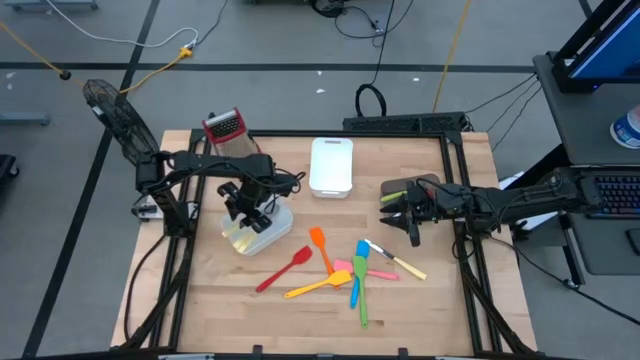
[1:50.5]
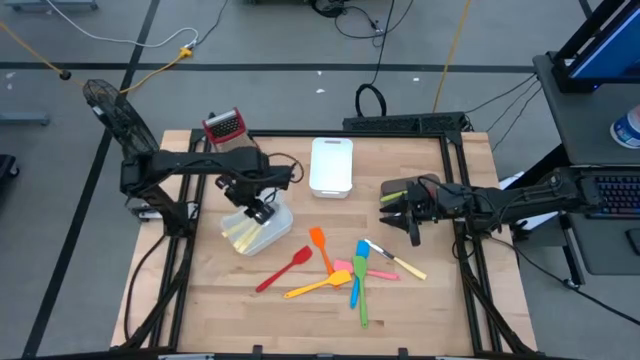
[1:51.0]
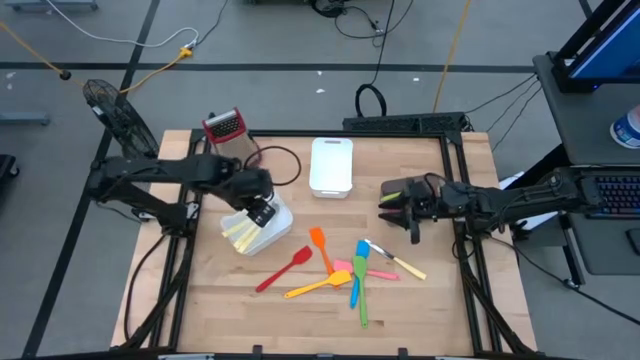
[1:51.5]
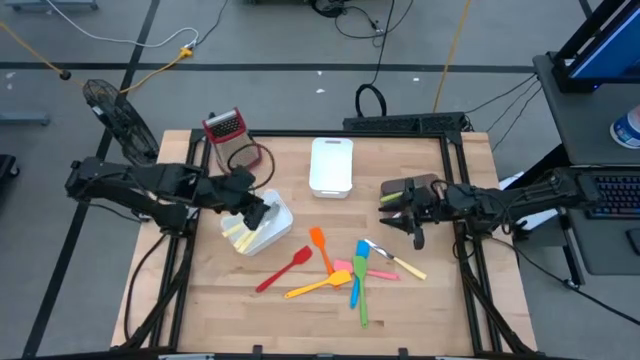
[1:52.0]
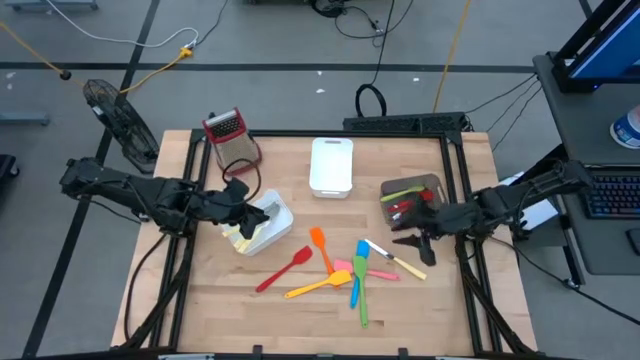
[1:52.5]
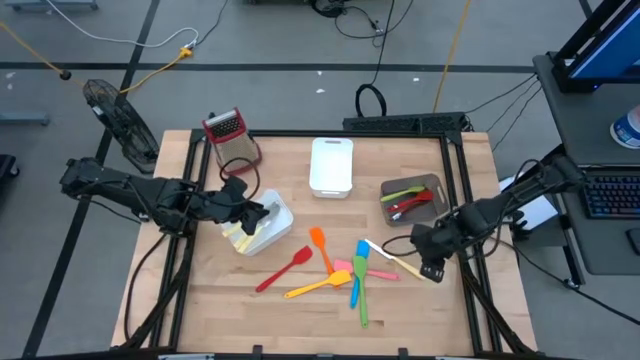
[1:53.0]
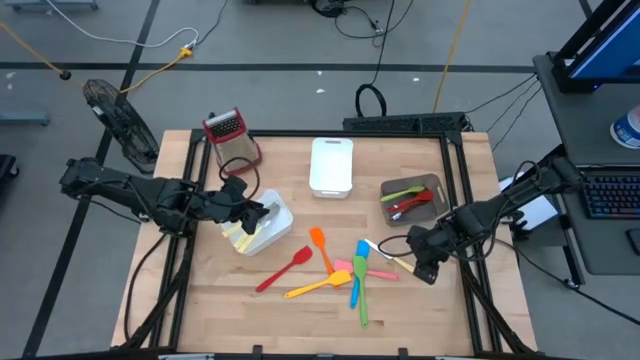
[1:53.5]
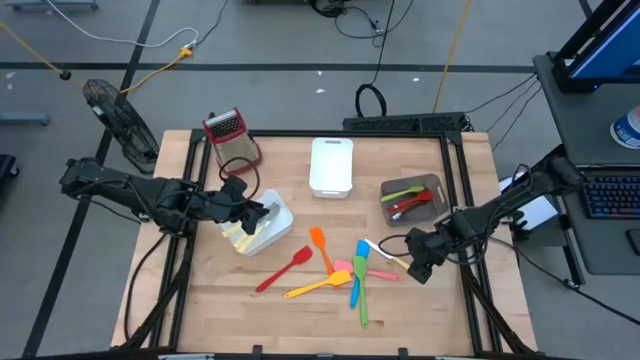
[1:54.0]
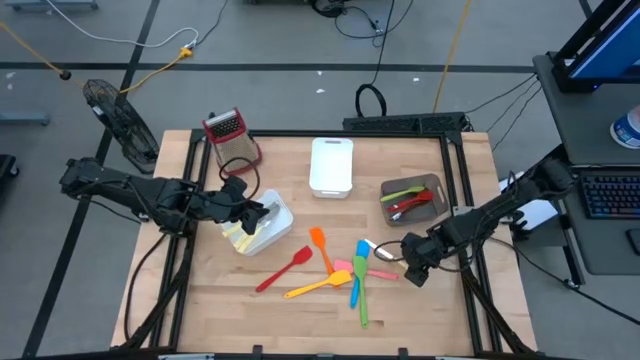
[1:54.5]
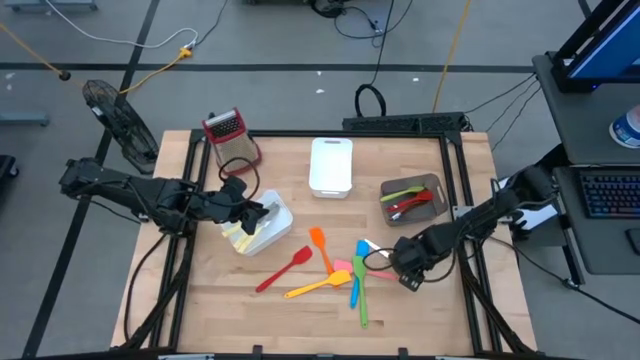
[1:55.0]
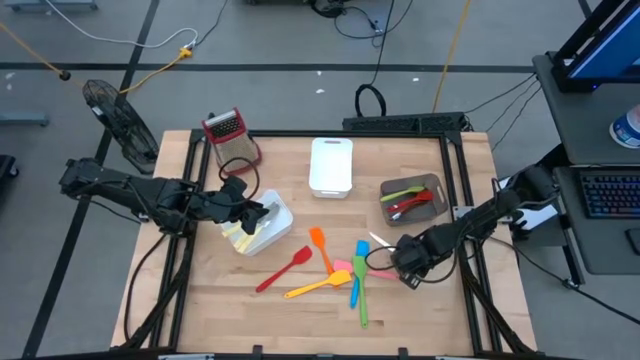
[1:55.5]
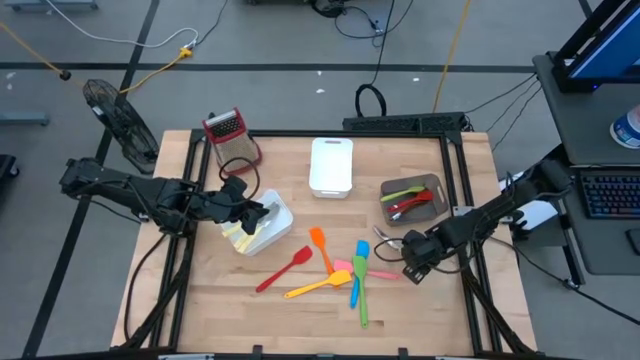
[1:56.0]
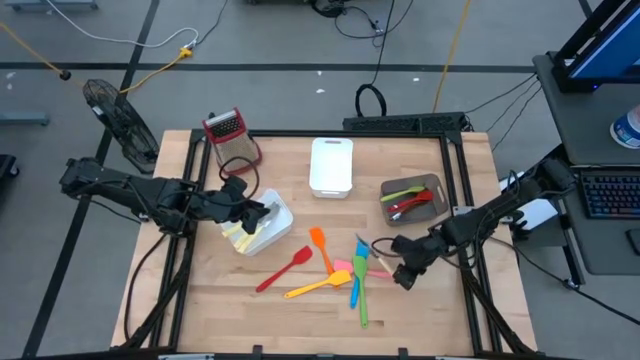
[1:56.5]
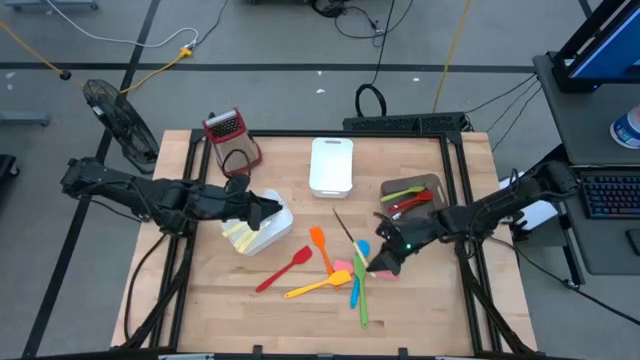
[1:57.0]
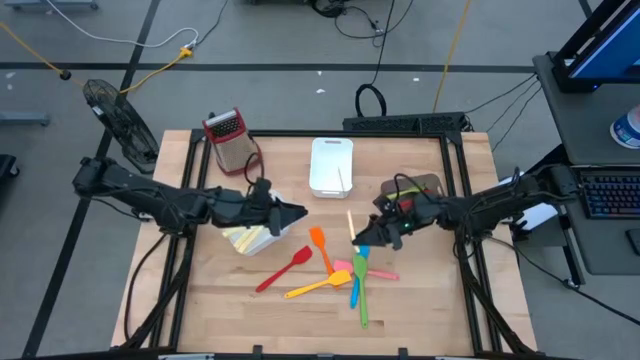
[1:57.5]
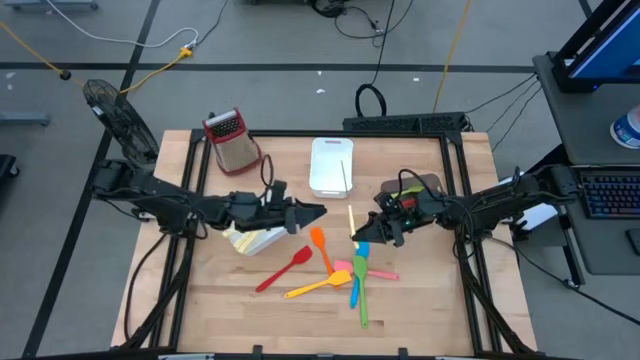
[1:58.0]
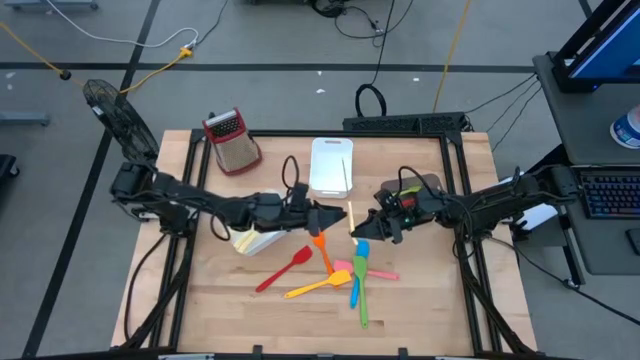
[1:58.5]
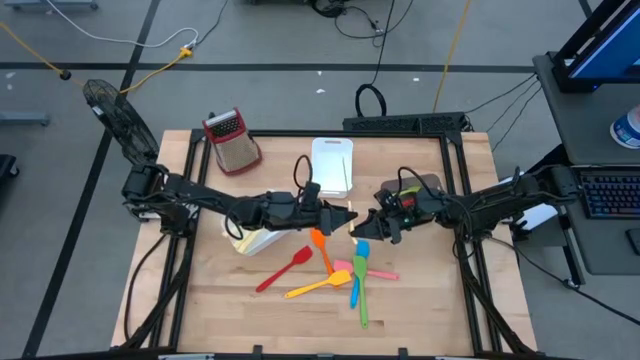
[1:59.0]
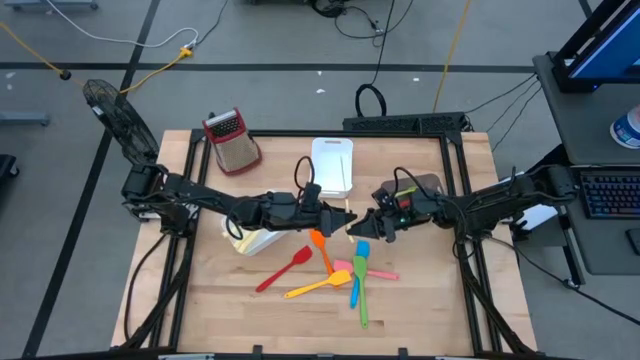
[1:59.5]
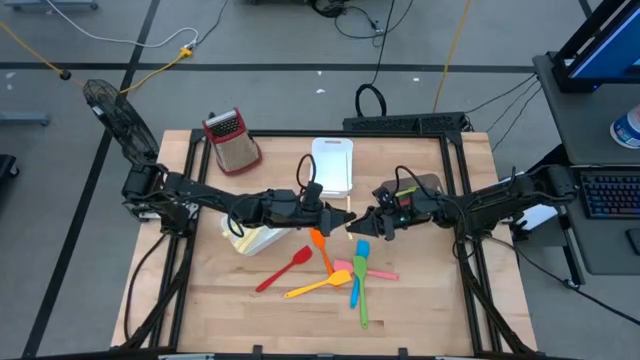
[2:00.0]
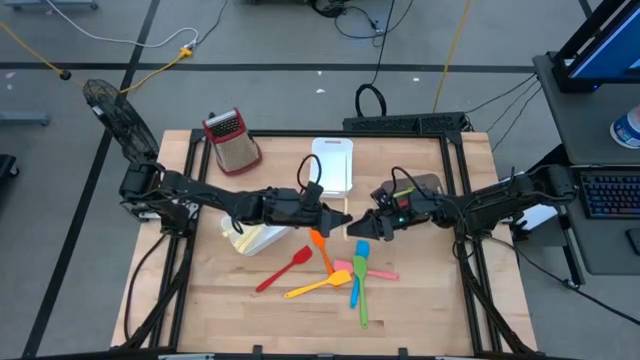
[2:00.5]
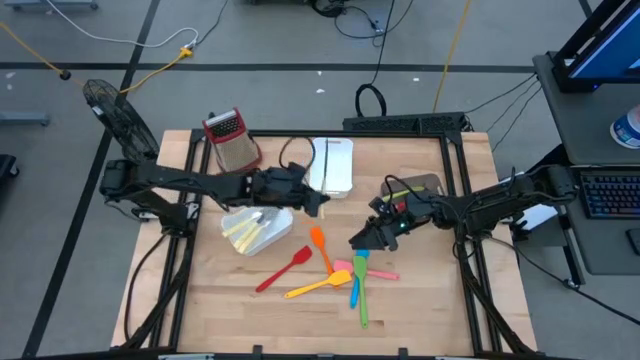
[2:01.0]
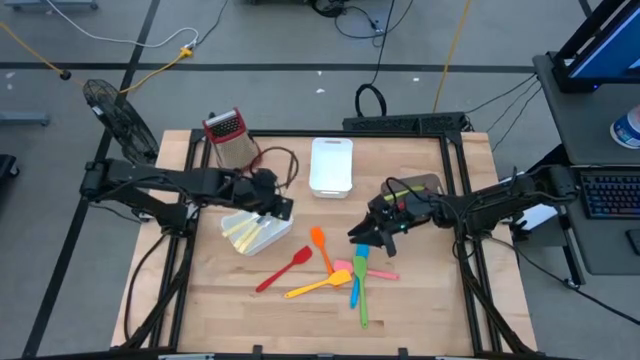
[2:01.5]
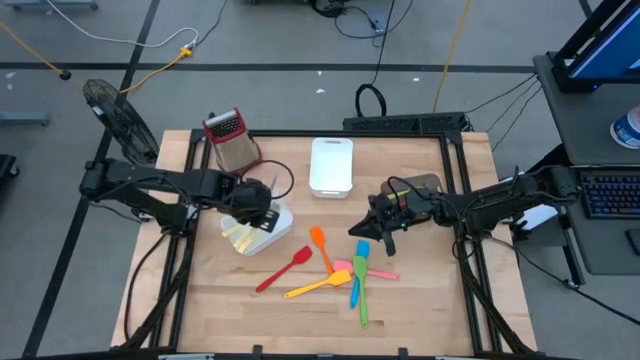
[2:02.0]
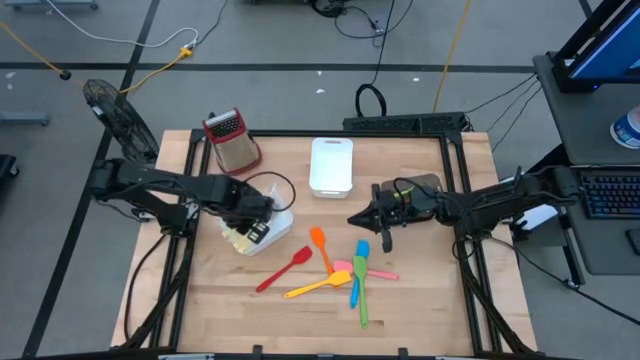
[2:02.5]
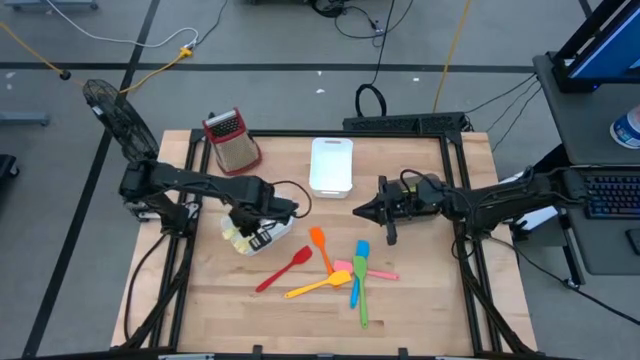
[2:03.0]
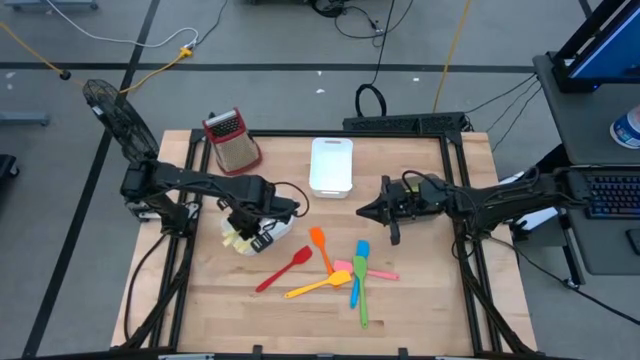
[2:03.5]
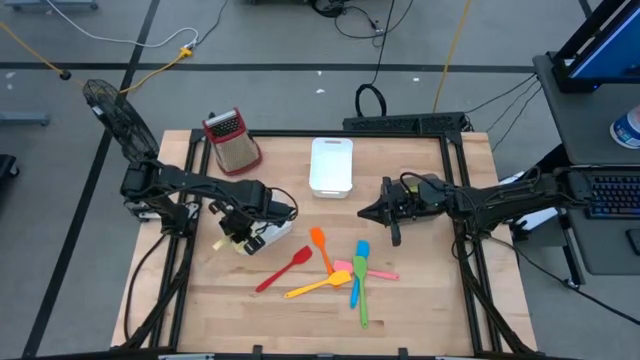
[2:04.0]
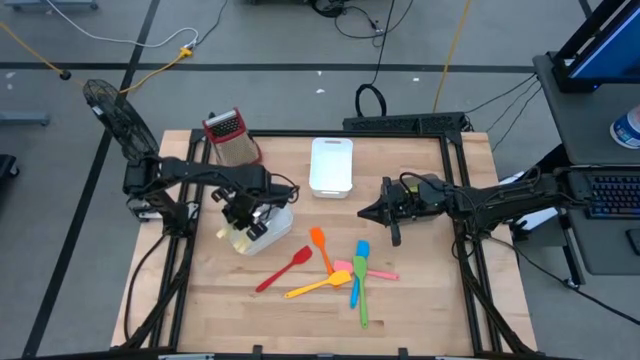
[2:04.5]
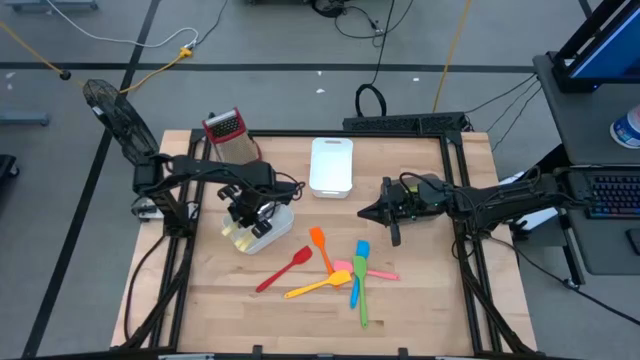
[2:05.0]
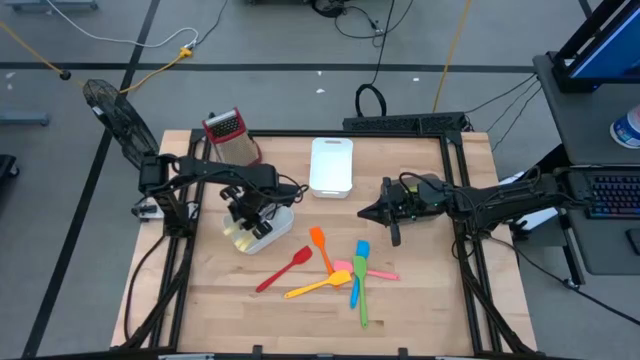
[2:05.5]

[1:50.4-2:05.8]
Task: Pick & Place Kitchen Items
Put the white table knife into the bottom white bin

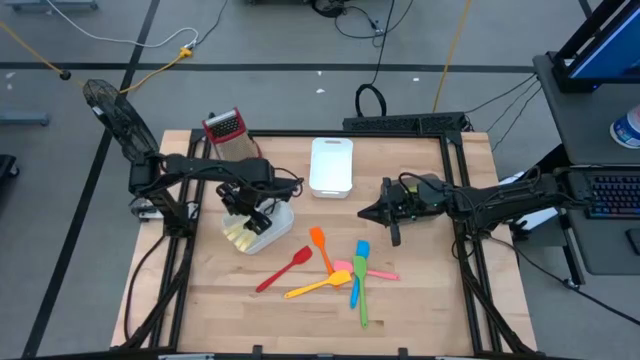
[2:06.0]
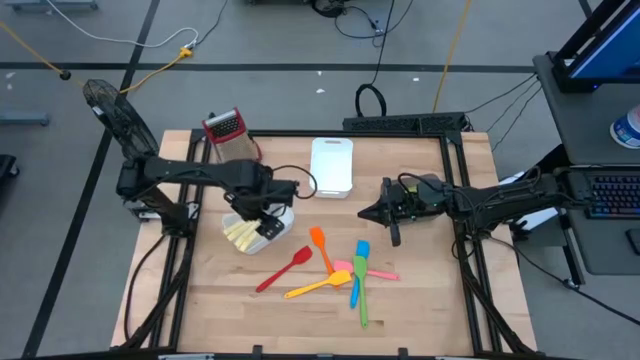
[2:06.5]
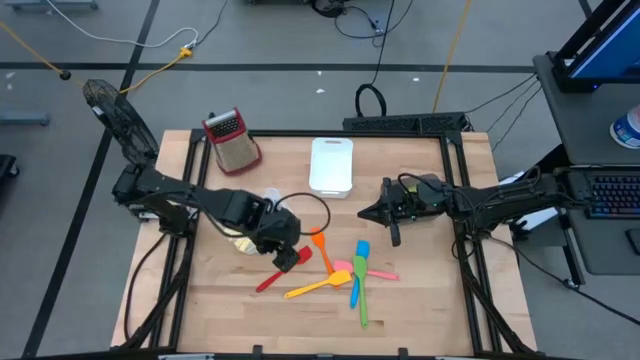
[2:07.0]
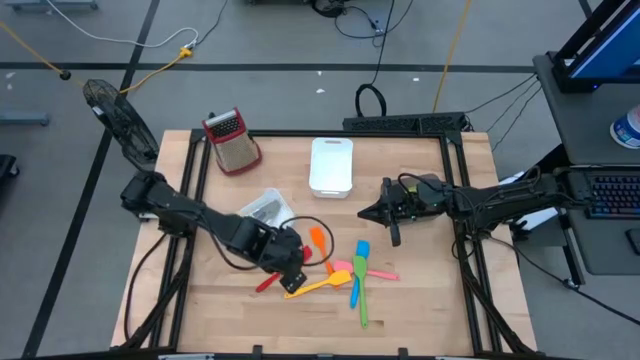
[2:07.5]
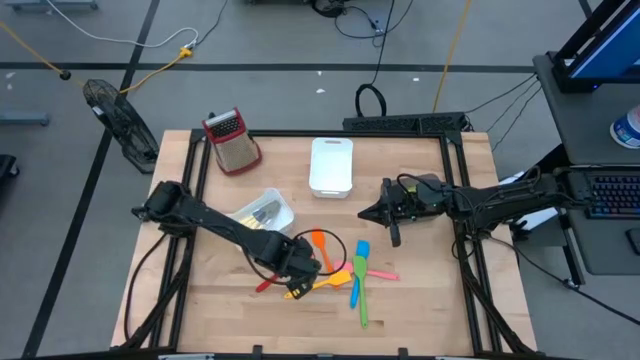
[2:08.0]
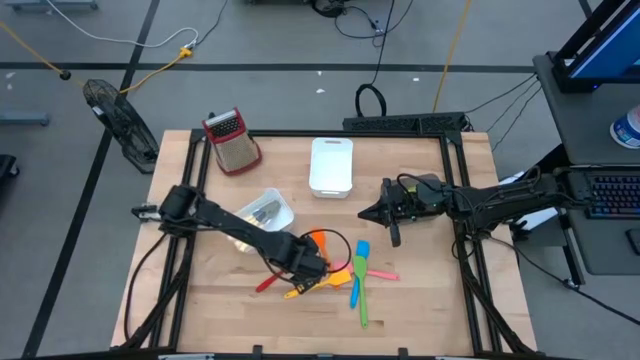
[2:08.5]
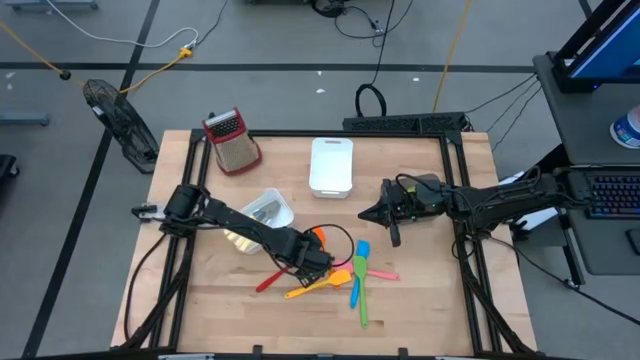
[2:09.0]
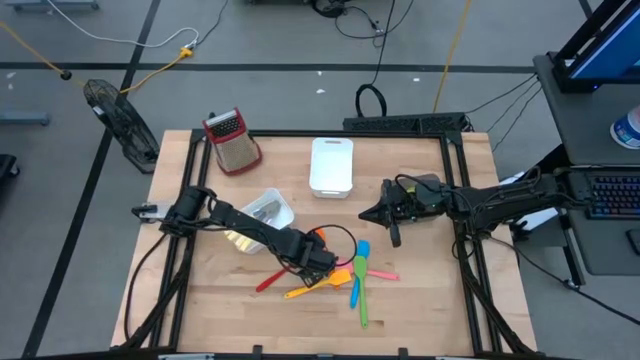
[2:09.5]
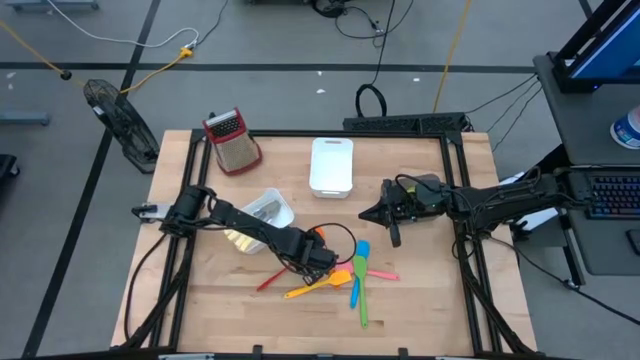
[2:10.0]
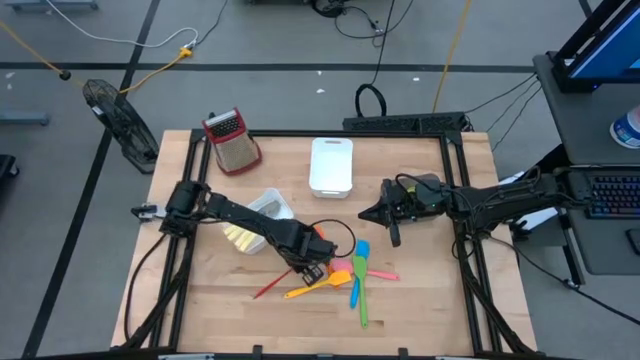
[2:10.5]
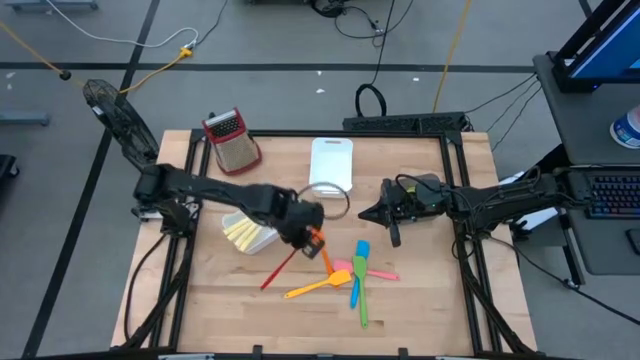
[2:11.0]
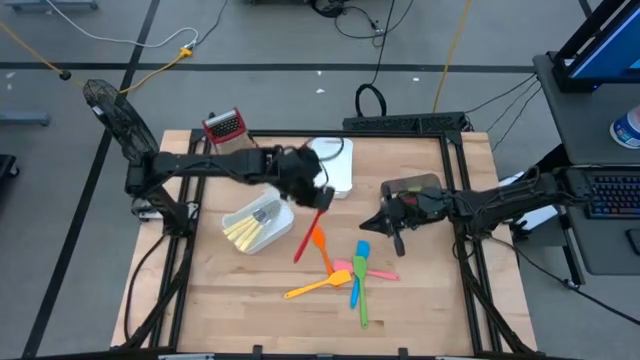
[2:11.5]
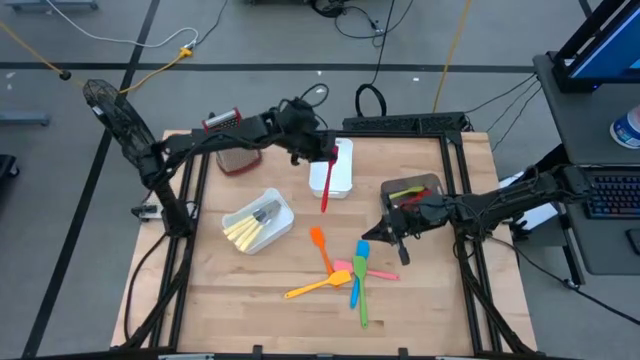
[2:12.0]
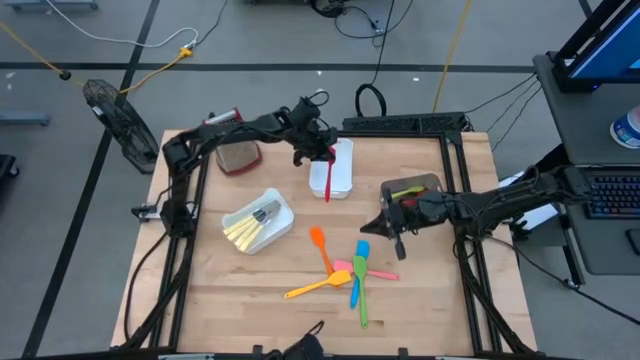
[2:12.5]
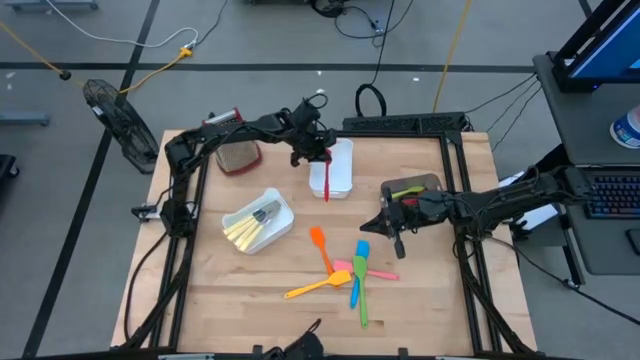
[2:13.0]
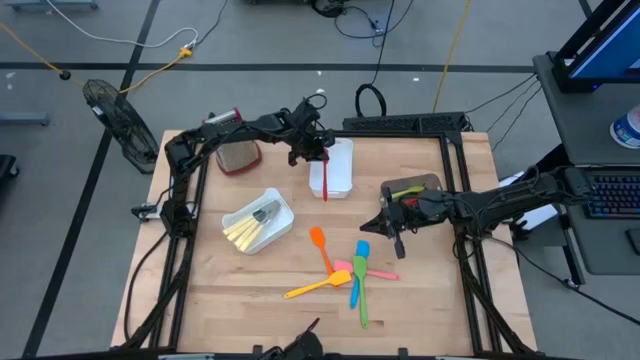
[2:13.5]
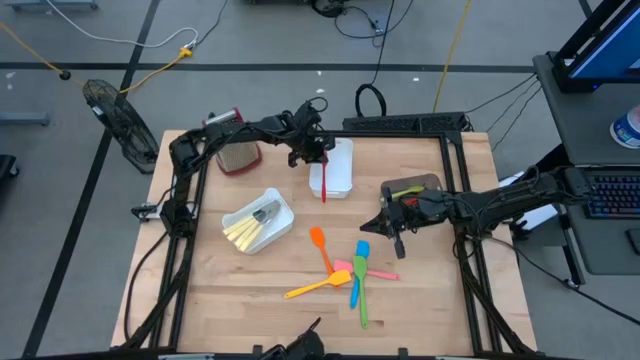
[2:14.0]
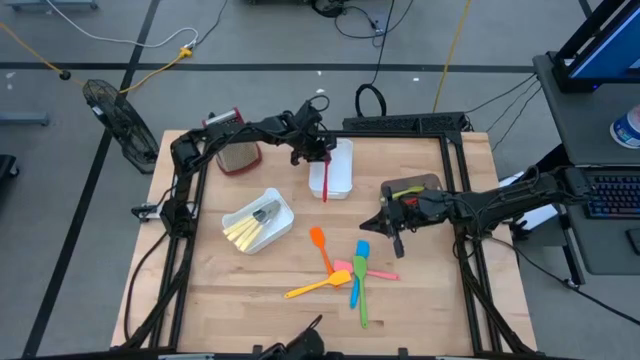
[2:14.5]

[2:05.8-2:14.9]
Put the red spatula into the top white bin
